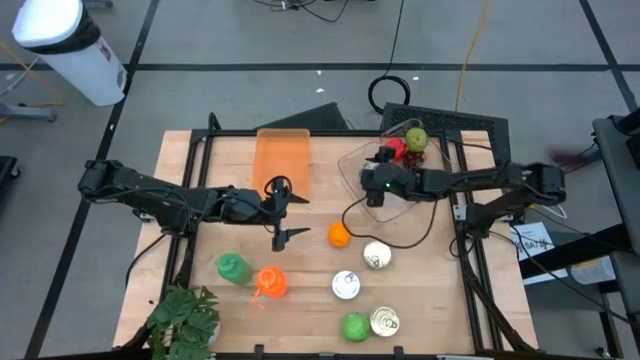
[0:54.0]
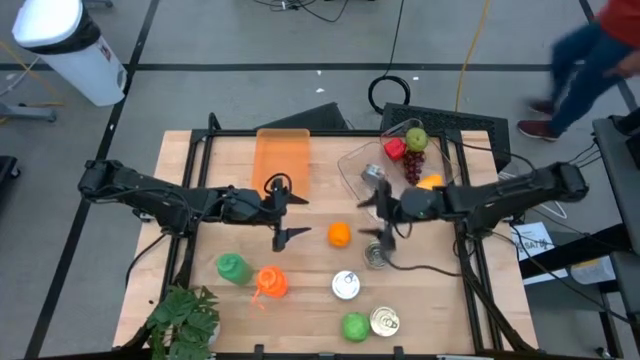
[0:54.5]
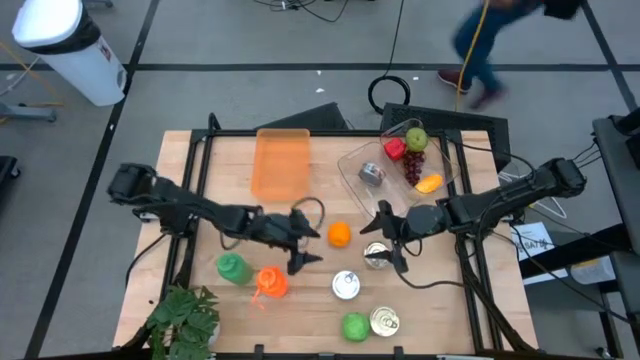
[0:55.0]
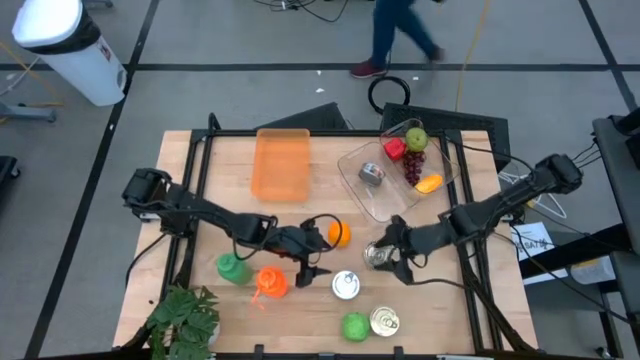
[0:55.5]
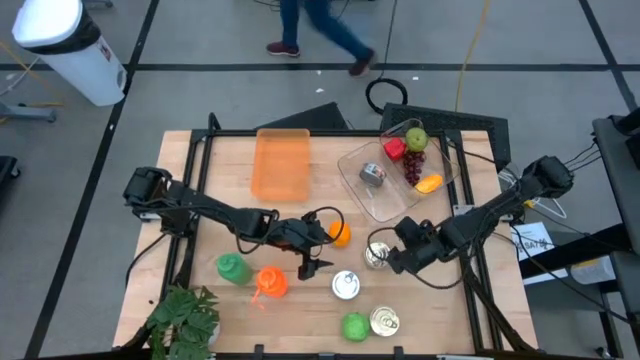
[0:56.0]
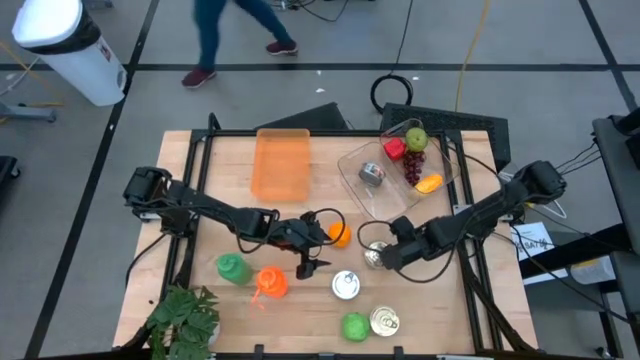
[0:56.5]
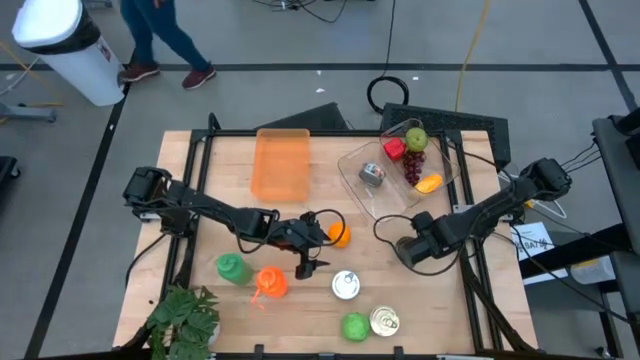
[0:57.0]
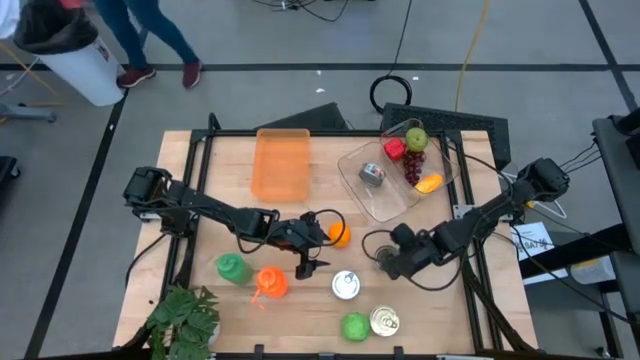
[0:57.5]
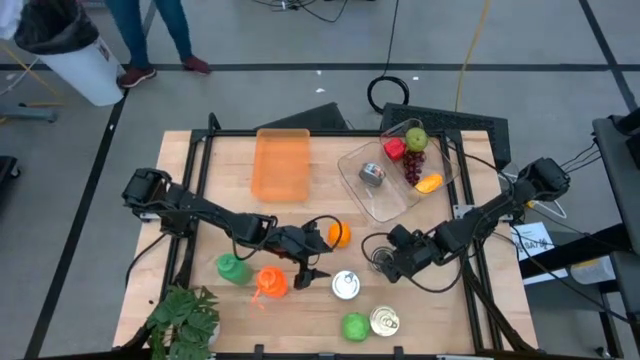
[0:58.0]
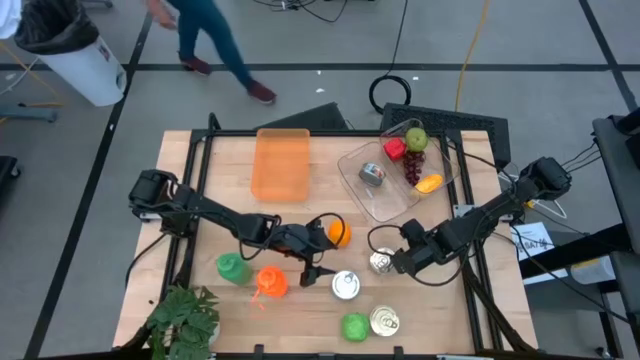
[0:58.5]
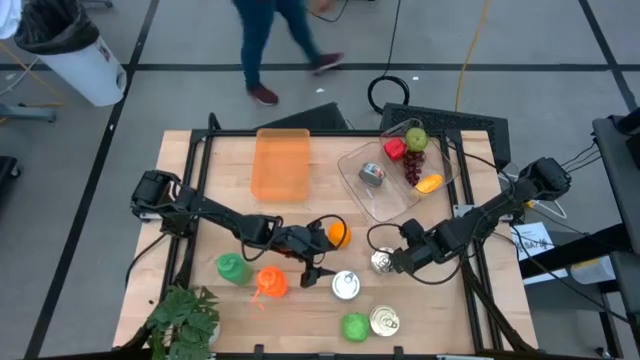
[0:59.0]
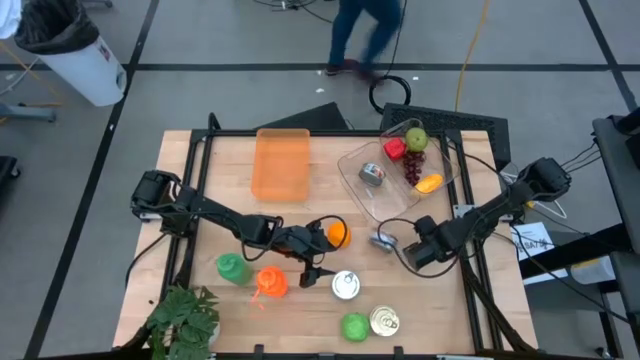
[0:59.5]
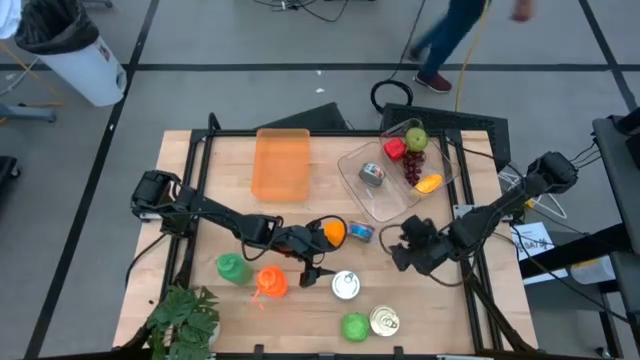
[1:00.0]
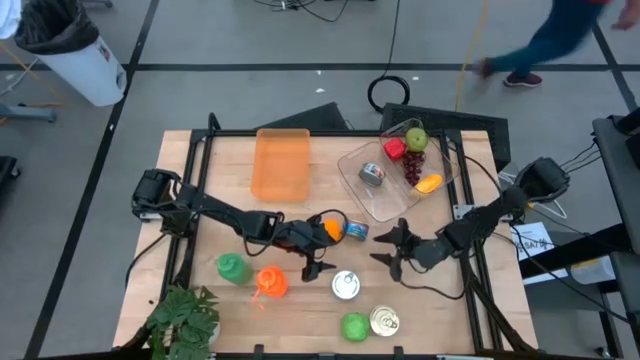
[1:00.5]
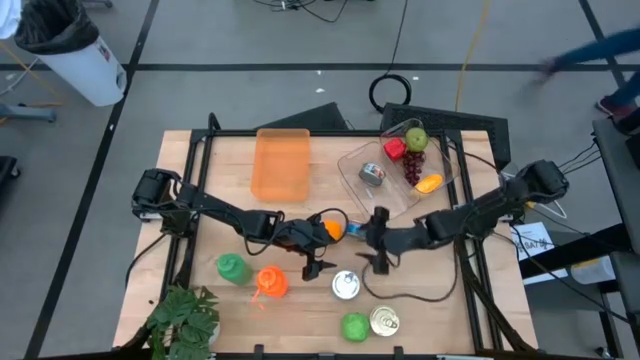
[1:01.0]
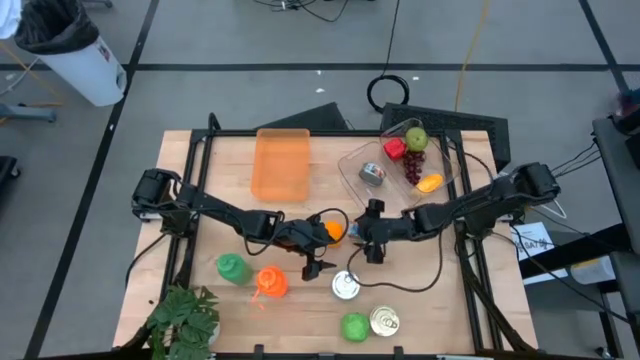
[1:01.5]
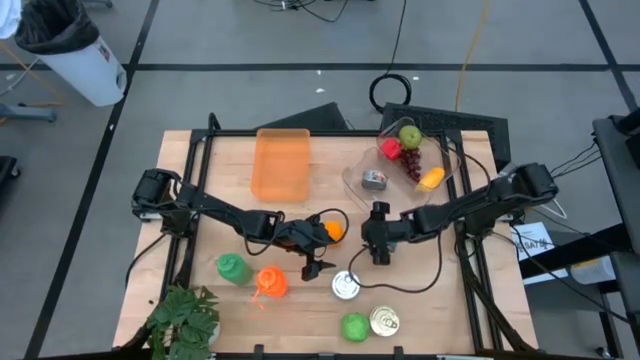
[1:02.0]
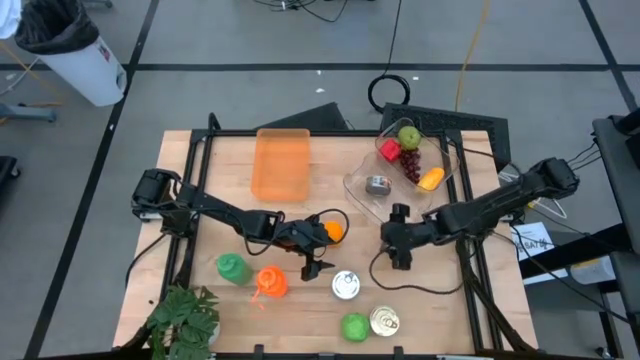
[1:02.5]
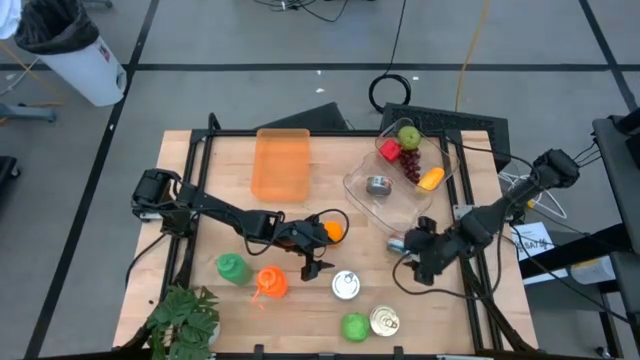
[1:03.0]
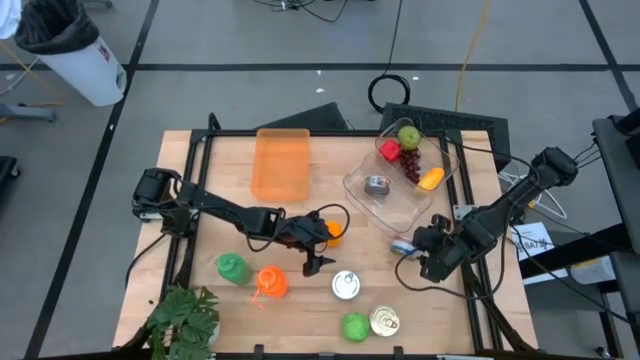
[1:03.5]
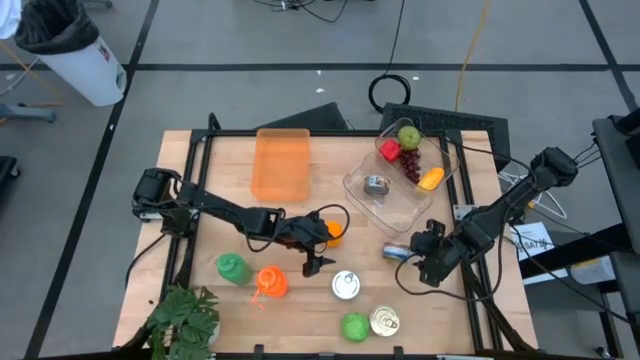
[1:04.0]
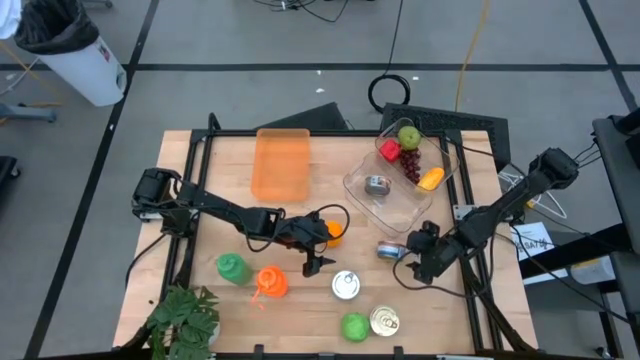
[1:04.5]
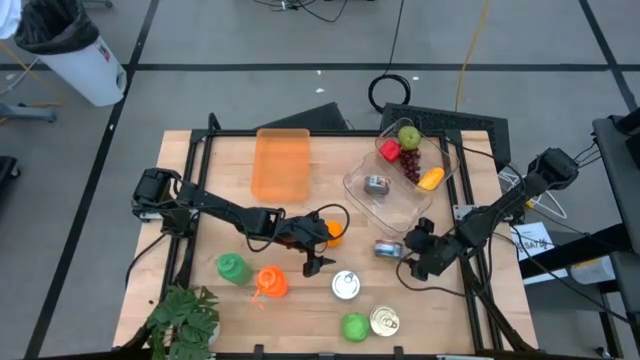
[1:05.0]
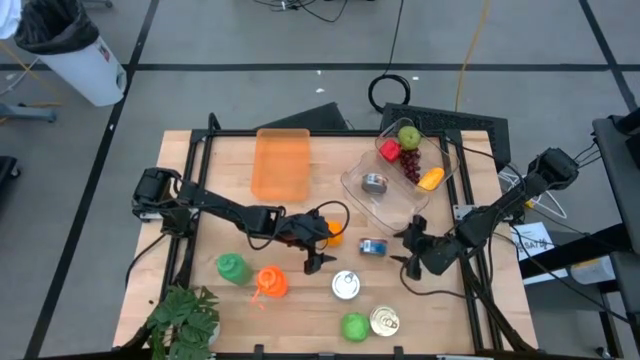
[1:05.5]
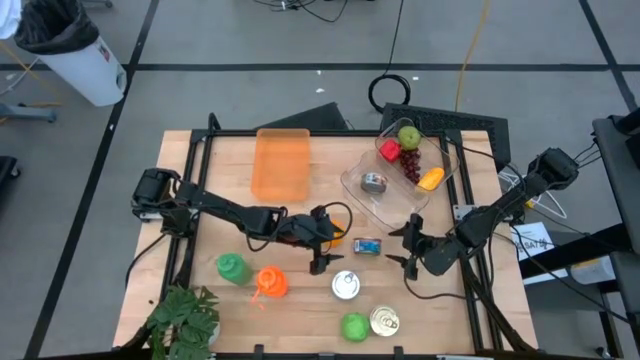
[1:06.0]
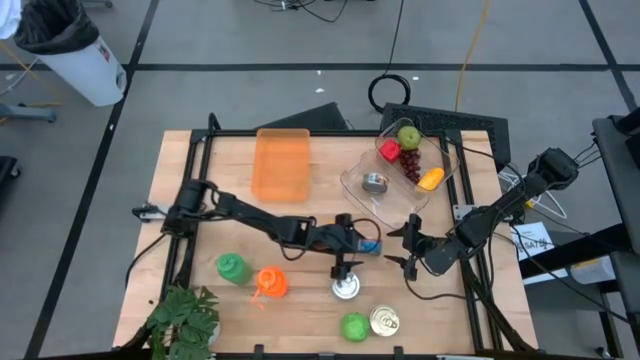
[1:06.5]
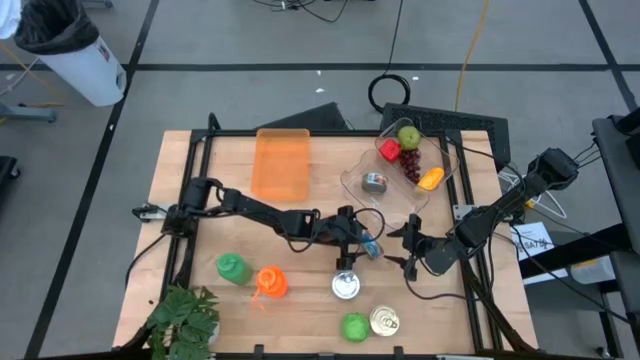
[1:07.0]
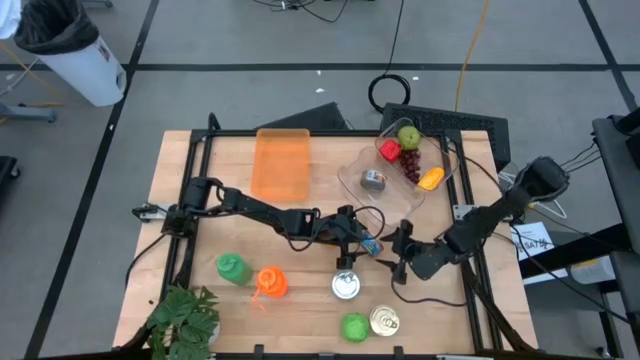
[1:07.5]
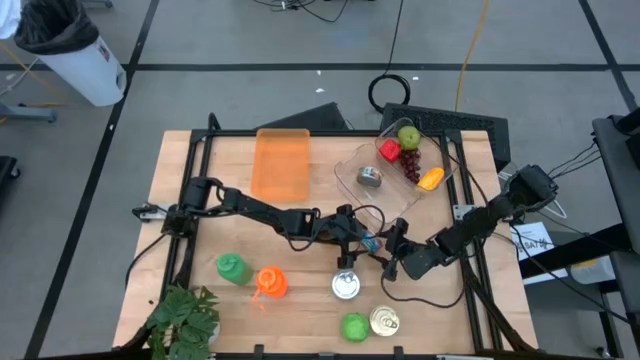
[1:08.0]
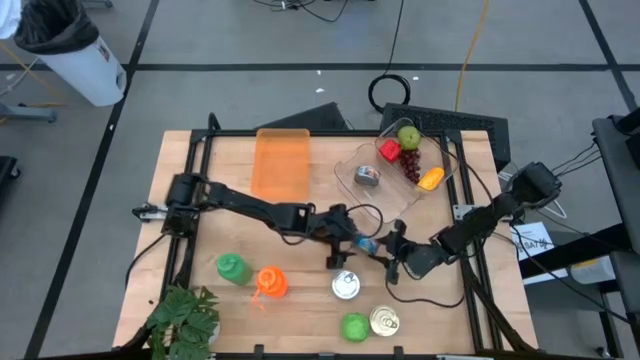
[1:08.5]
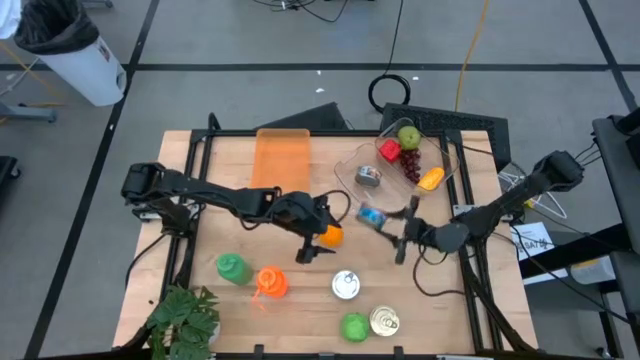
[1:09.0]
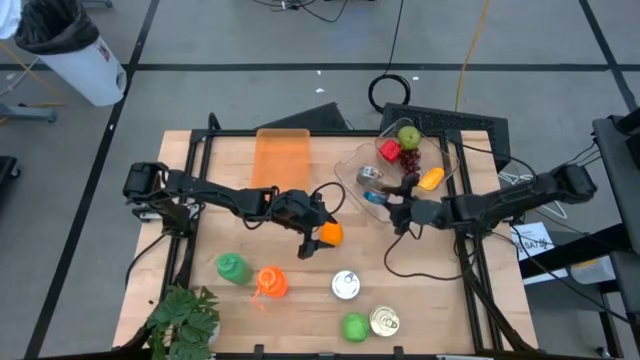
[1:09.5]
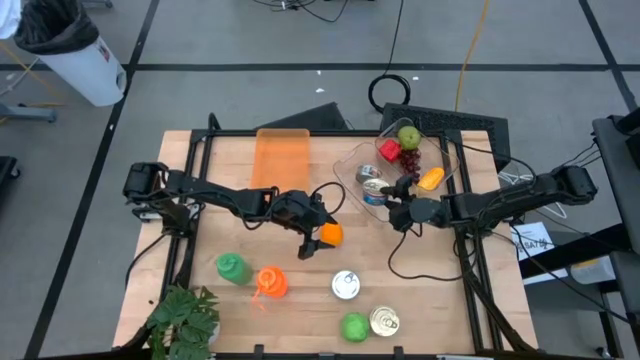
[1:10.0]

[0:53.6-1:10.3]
Task: Pick & Place Food Item
Put the top blue tuna can into the left transparent bin
